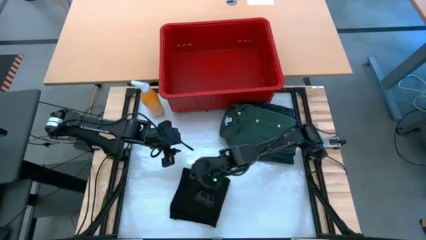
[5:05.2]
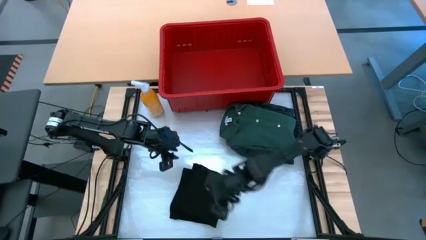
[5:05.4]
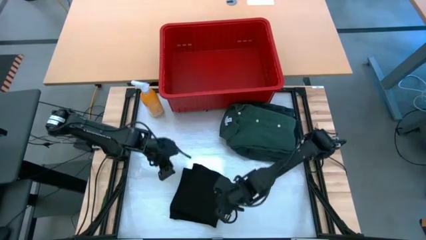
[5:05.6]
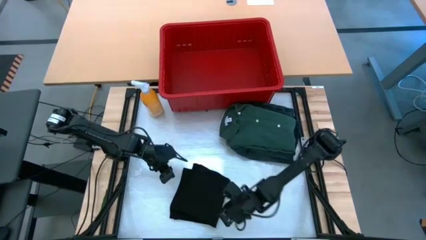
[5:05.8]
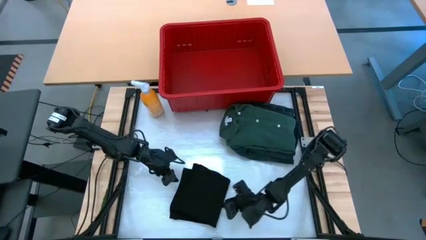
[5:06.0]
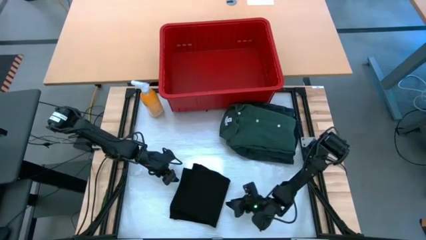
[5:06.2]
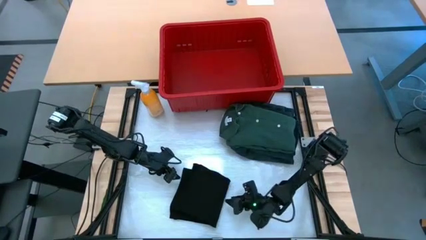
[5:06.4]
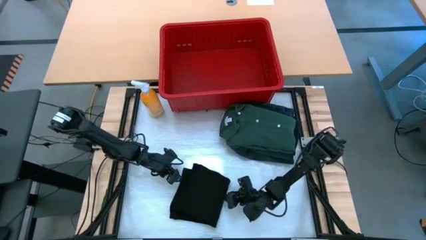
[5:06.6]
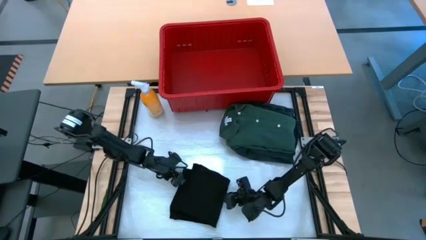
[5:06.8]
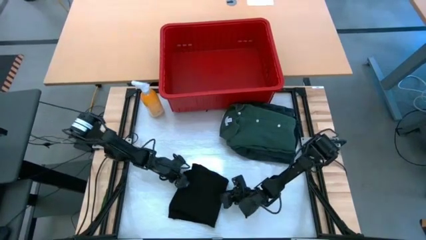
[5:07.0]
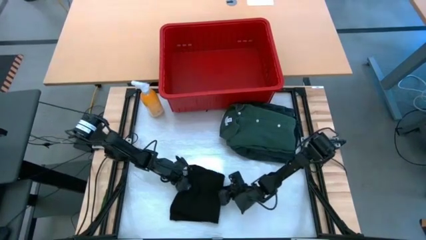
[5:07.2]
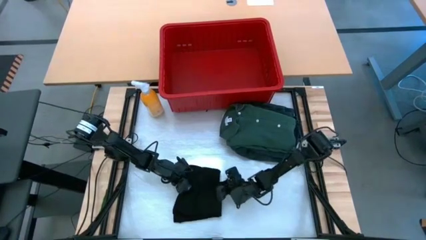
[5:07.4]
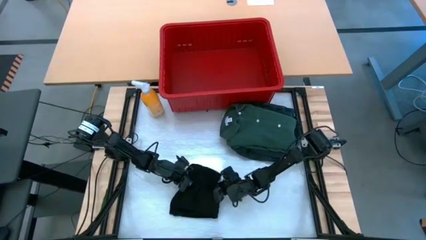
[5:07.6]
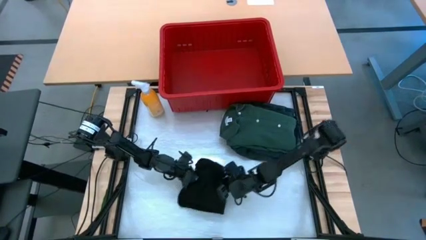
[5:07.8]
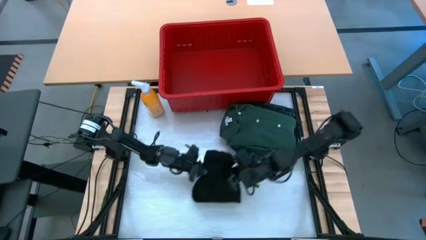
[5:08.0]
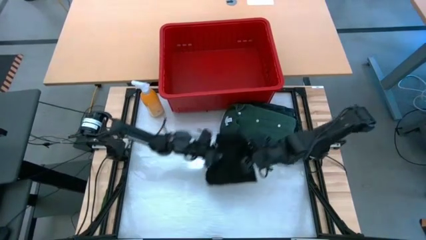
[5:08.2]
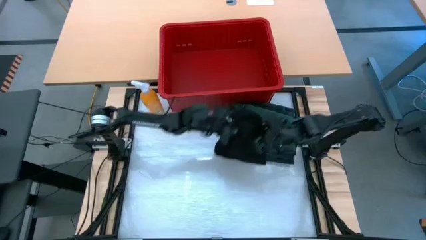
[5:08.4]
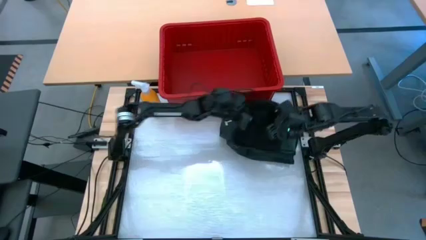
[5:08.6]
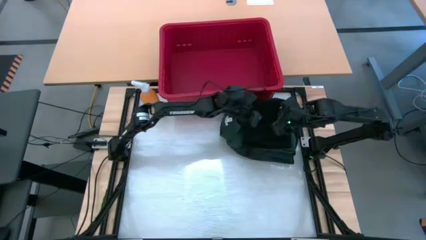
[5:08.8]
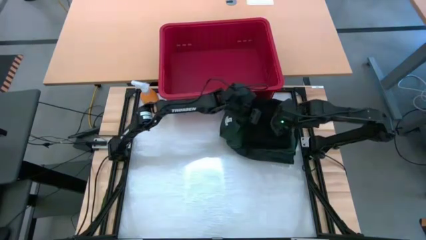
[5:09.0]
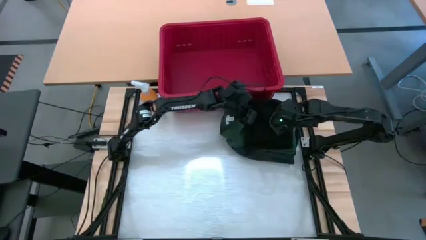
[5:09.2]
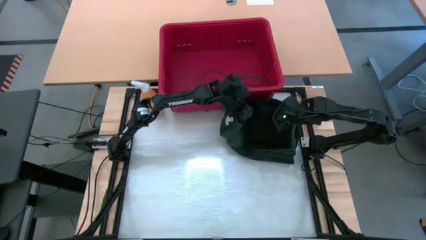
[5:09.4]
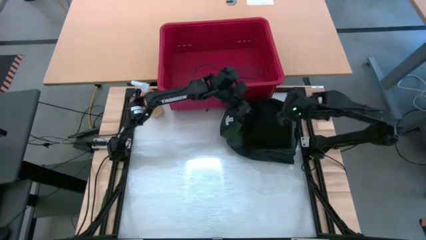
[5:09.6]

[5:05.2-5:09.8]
Task: Fold laundry
Stack the black shirt on top of the green shirt on the table

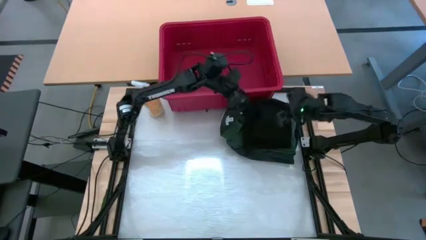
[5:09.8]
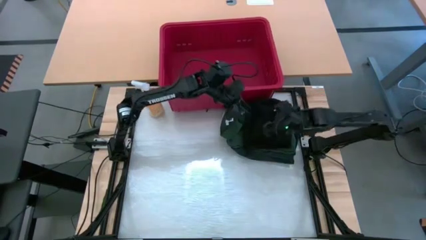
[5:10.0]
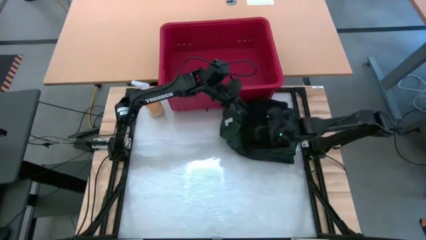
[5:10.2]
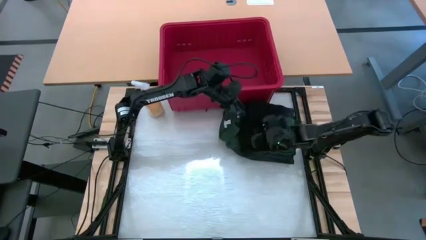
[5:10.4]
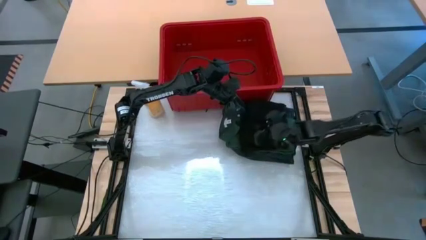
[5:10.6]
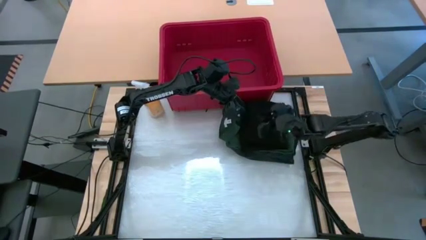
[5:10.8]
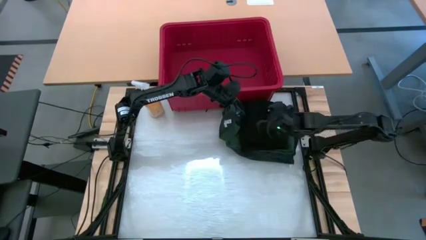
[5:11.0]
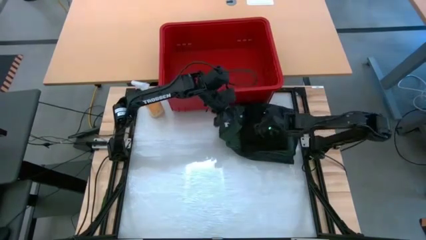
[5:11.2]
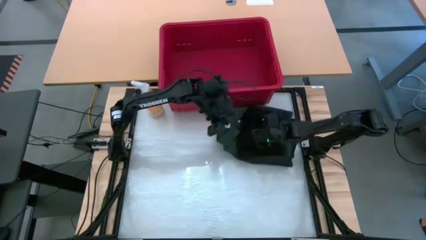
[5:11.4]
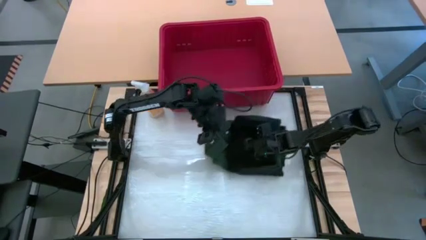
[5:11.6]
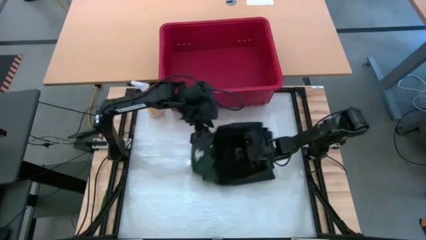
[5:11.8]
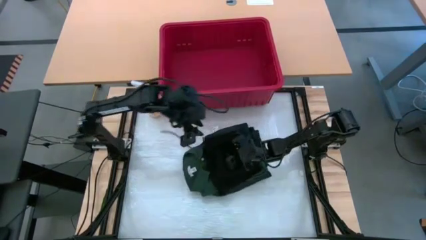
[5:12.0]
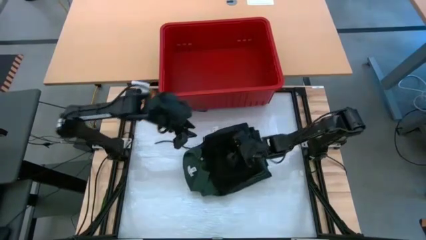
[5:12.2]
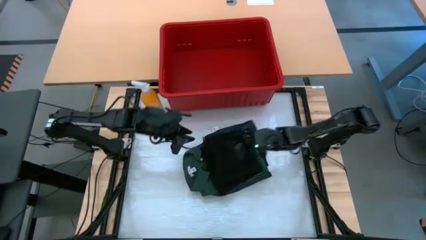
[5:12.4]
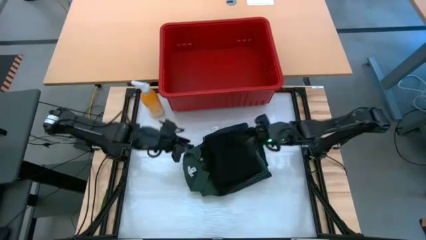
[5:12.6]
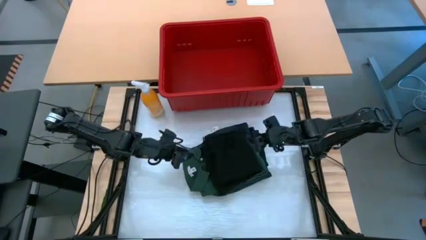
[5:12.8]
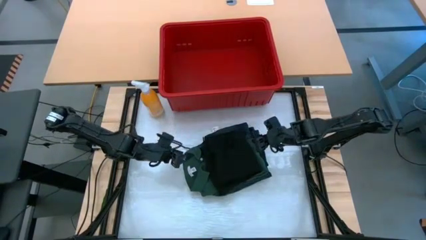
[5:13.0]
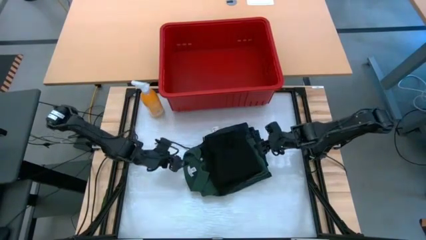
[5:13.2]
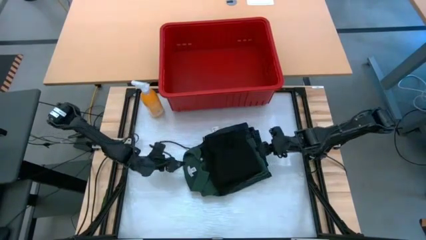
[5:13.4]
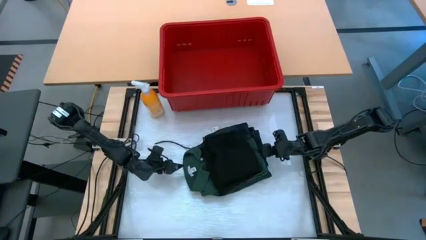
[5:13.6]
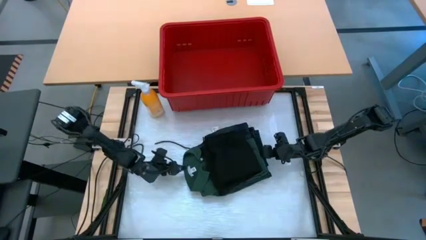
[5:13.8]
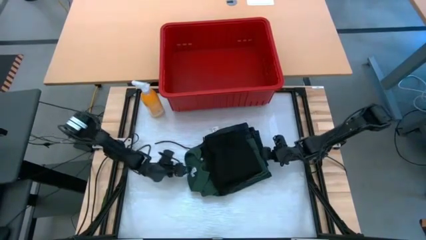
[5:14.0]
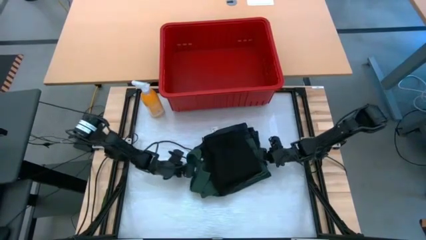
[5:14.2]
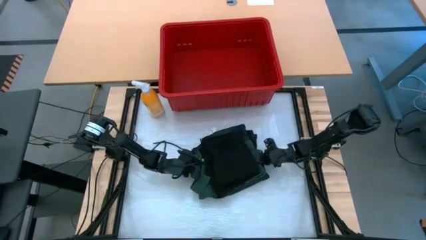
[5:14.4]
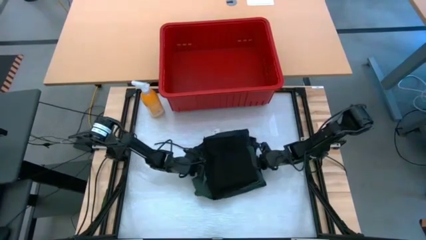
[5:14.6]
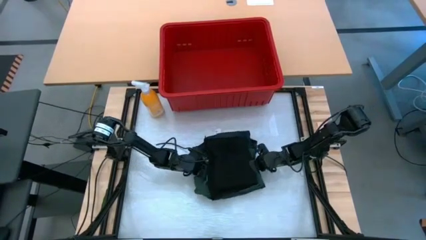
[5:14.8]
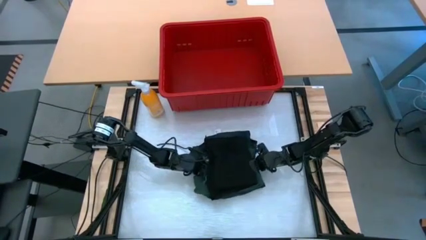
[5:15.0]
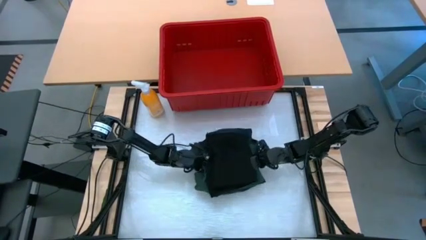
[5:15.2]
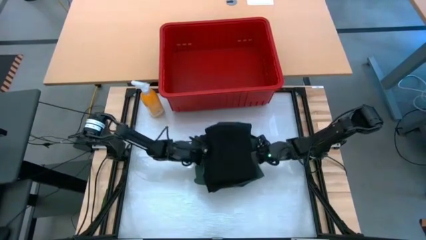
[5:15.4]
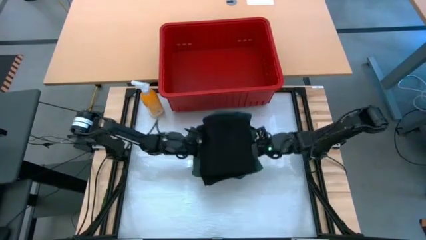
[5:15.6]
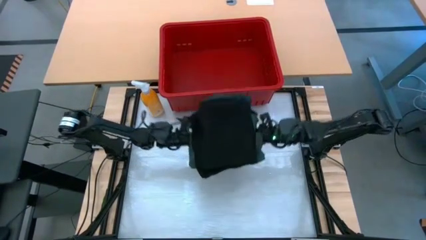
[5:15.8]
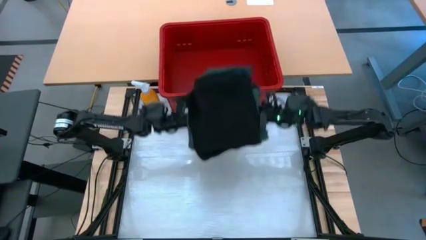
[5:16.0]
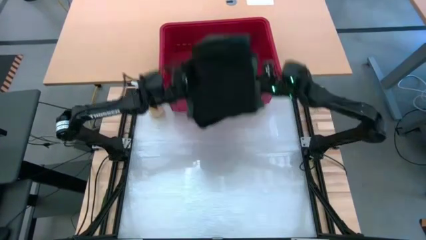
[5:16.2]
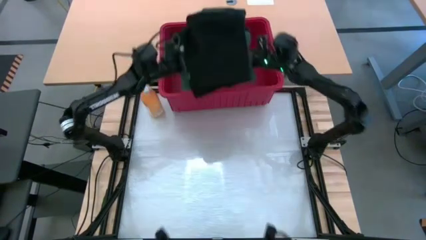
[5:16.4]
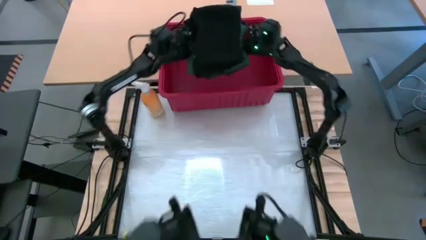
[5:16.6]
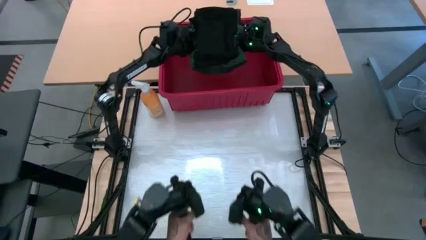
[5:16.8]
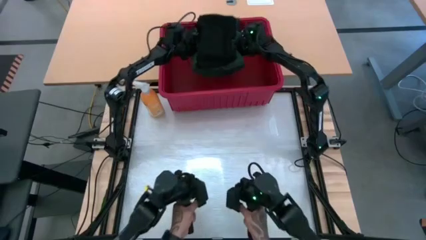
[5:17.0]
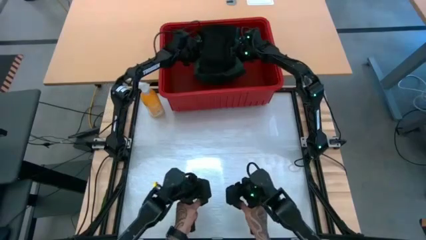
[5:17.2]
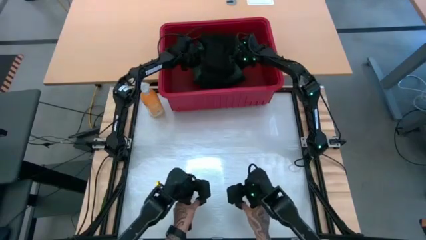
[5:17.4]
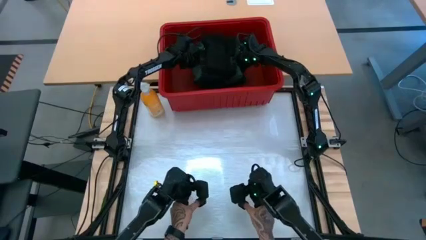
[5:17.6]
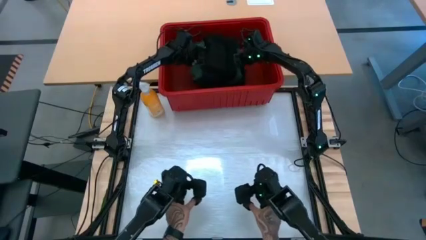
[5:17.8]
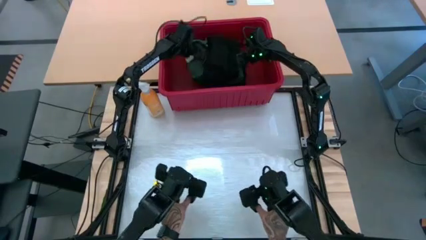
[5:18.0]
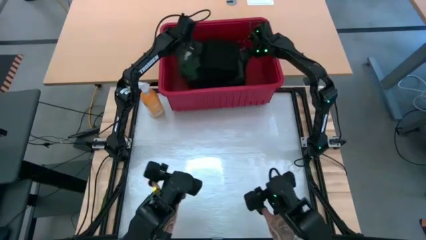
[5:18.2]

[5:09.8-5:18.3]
Put the stacked folded clothes into the red bin

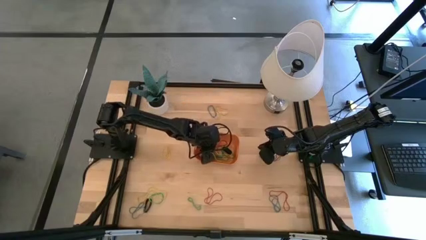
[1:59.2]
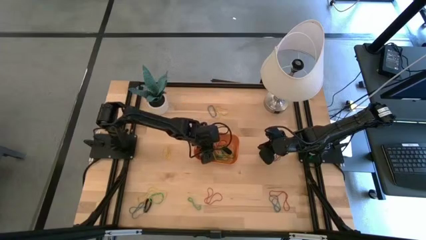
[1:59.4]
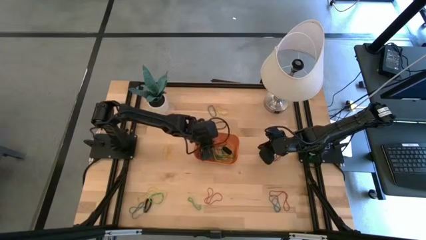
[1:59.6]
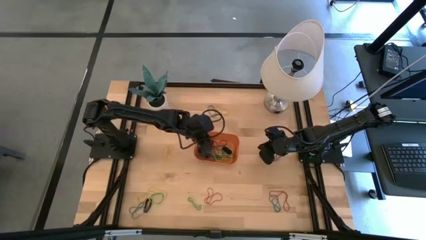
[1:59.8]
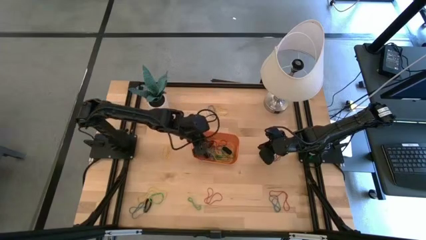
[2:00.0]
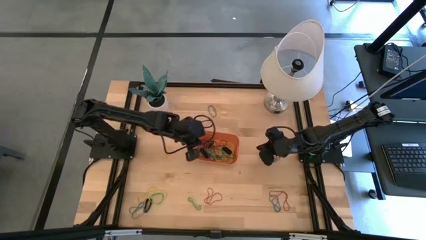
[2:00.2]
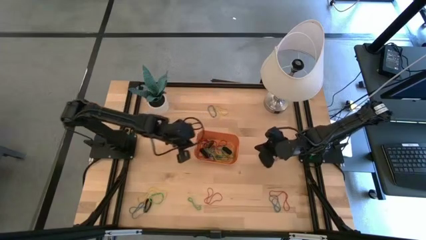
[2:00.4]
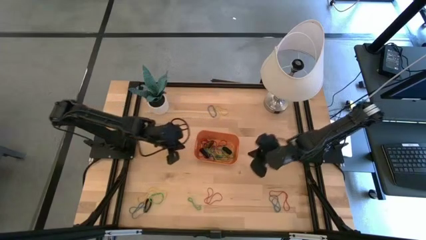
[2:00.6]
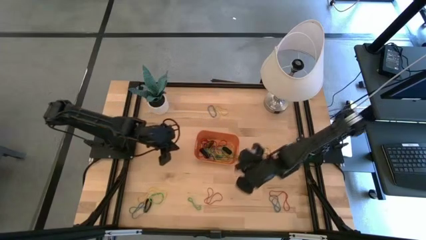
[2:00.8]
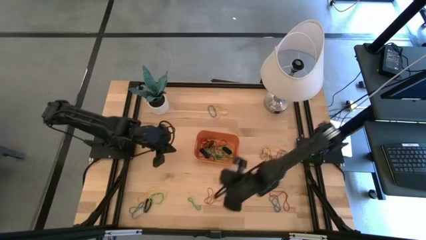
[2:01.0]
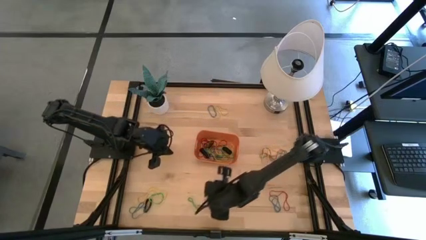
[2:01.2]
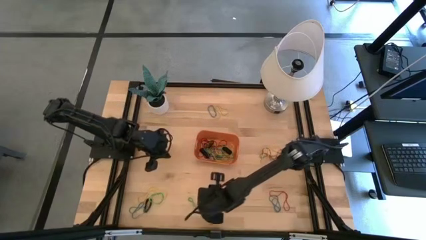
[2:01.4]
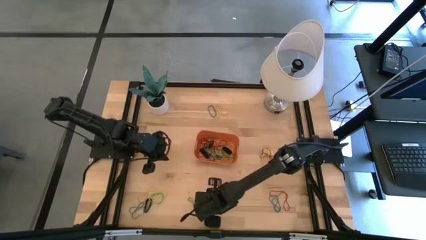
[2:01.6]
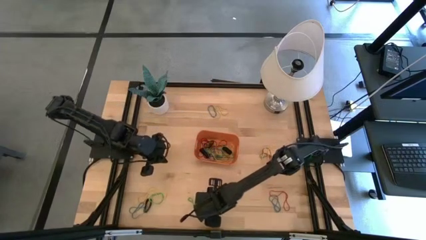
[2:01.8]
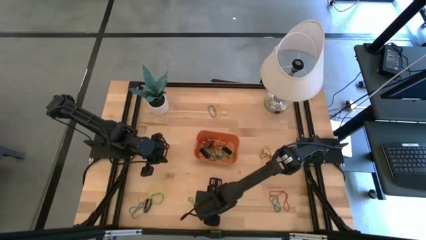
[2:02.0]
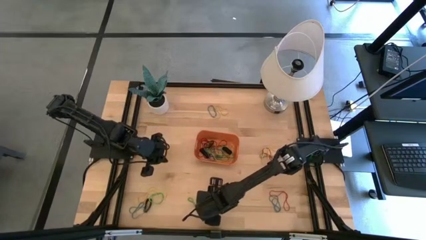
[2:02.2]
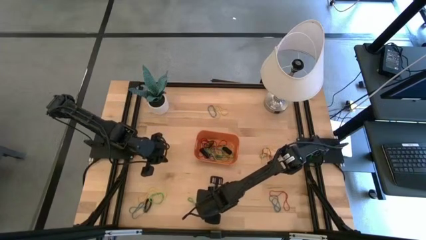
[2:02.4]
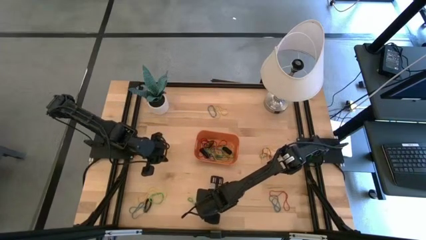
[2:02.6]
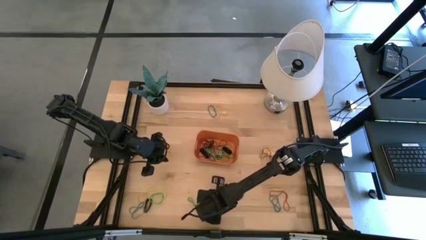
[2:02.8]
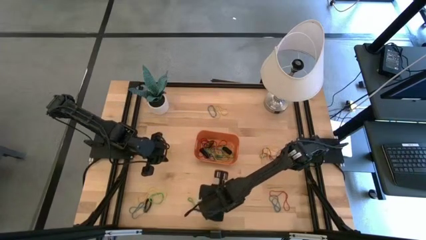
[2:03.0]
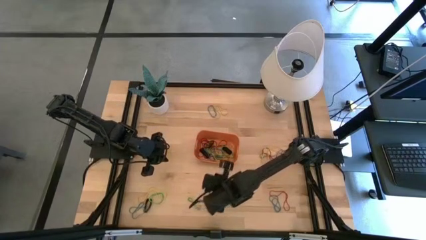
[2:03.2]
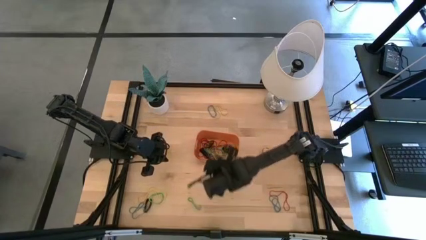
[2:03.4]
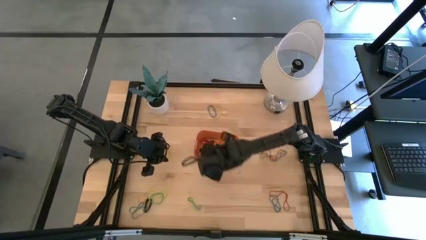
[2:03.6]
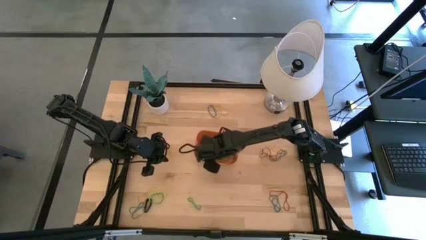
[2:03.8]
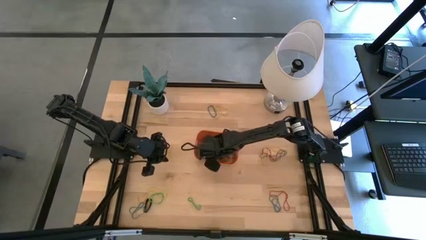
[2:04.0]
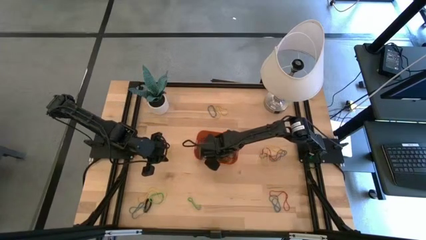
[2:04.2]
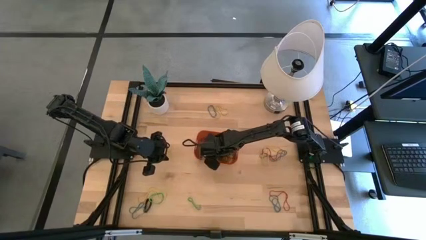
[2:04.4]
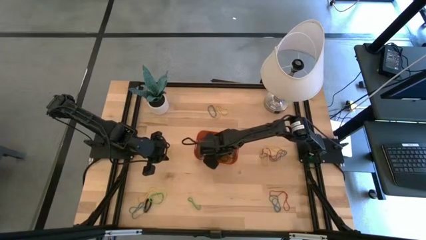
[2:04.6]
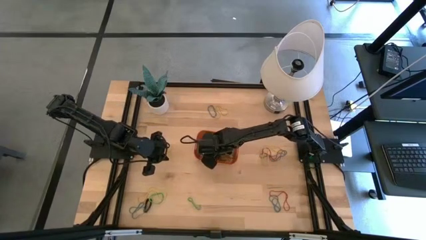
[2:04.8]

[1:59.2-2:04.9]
Task: Pick and place rubber bands into bin
Put the red rubber band into the orange bin
